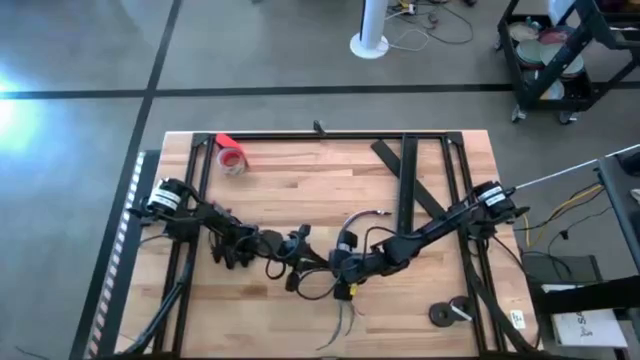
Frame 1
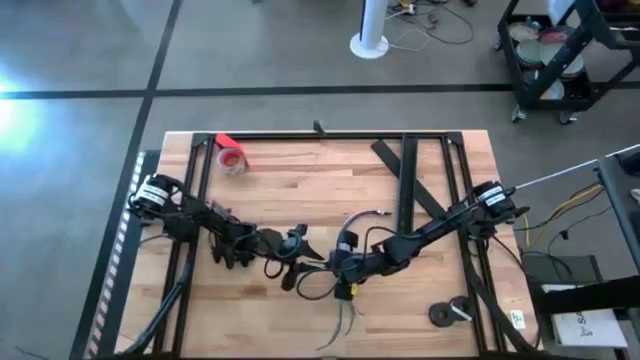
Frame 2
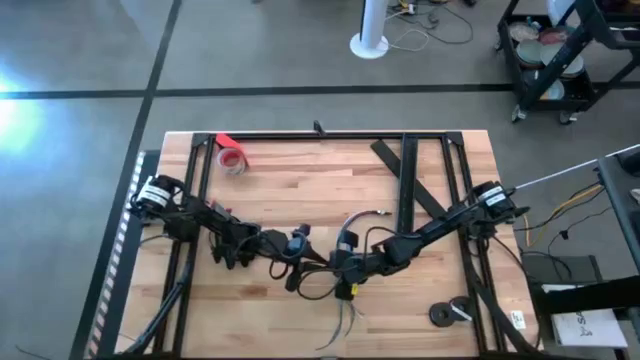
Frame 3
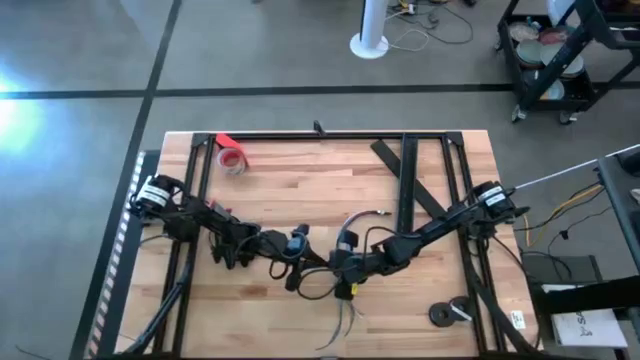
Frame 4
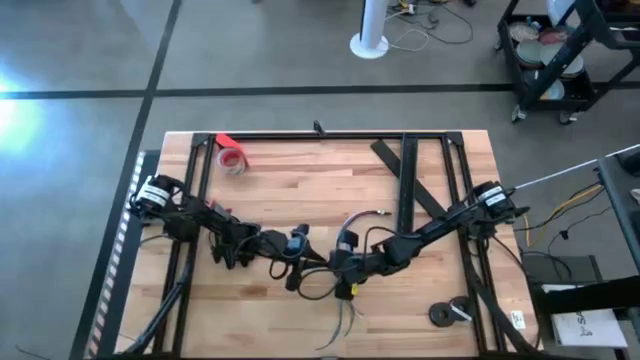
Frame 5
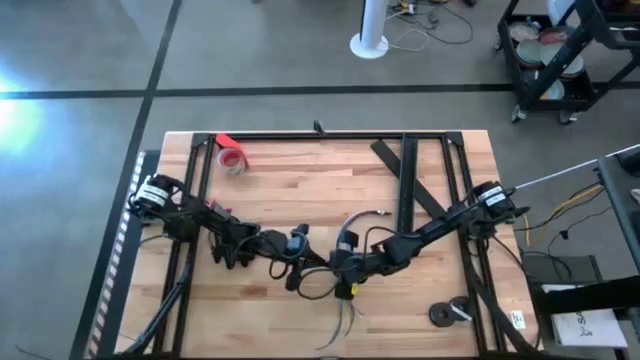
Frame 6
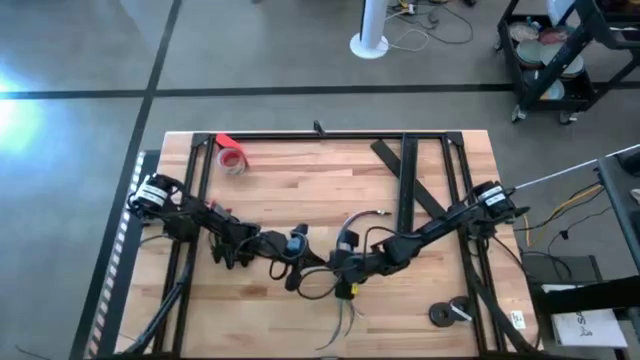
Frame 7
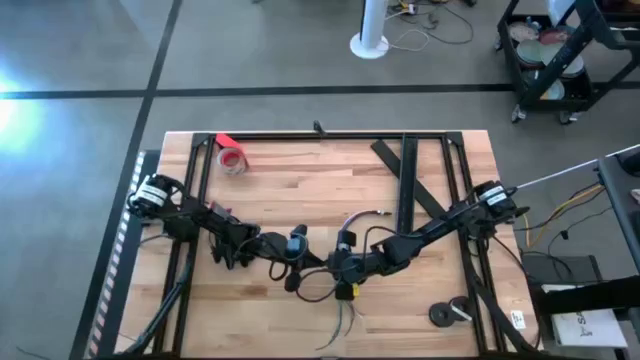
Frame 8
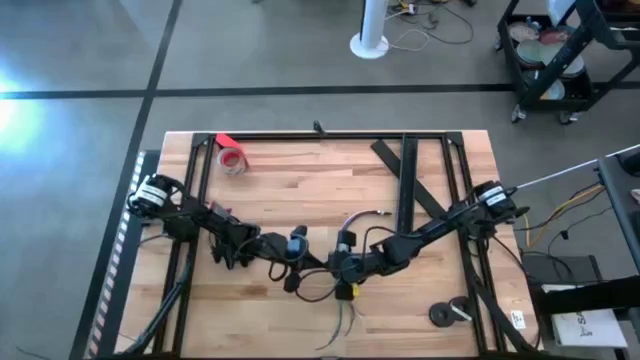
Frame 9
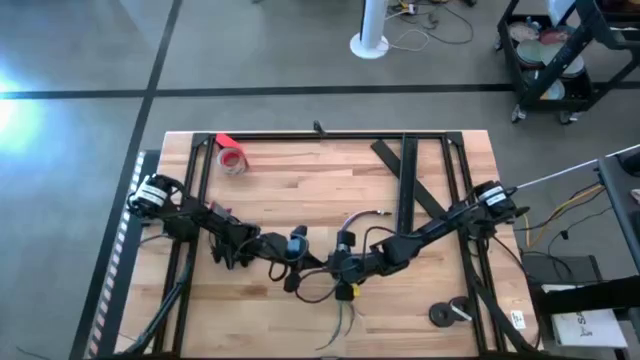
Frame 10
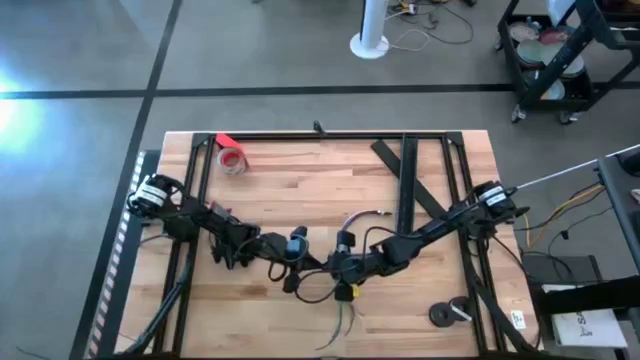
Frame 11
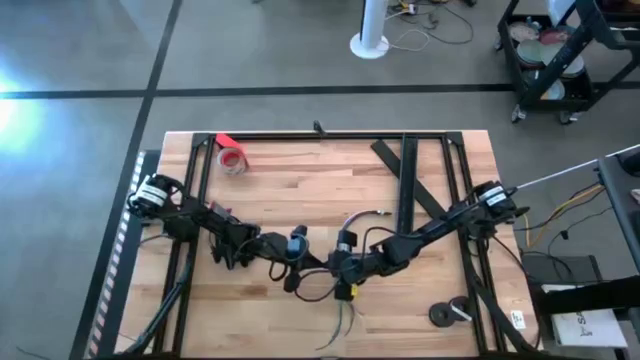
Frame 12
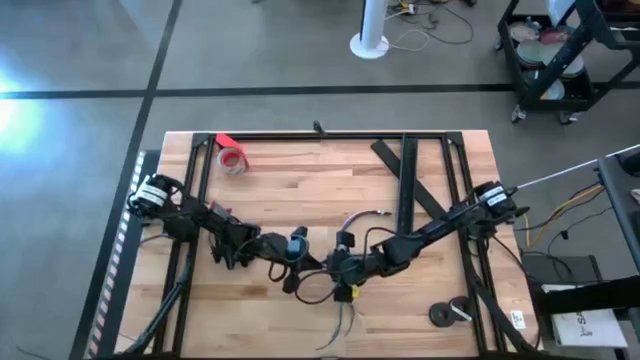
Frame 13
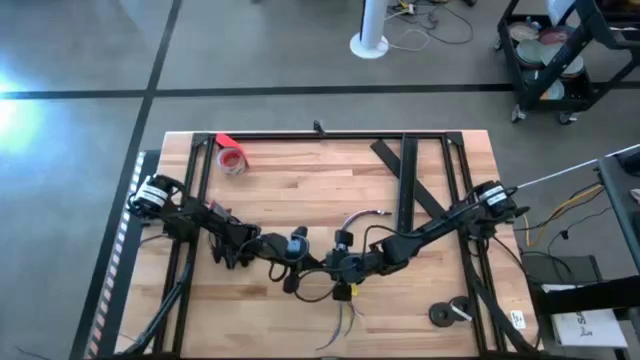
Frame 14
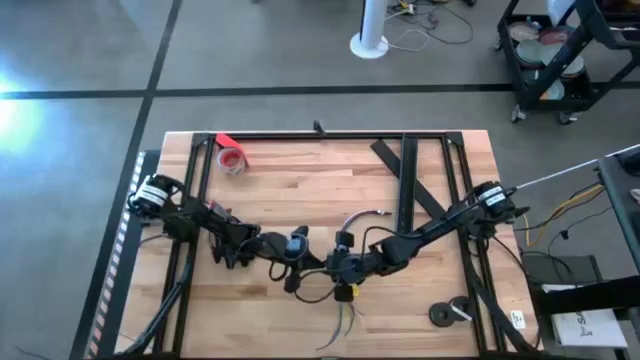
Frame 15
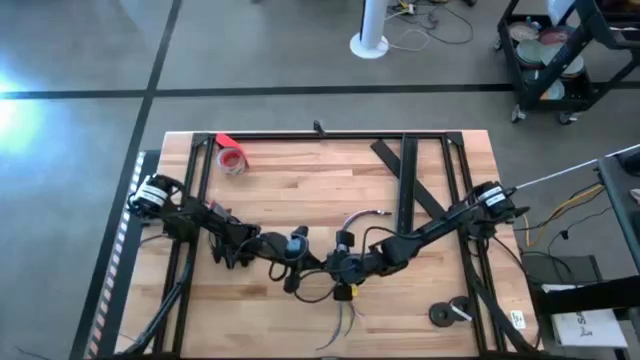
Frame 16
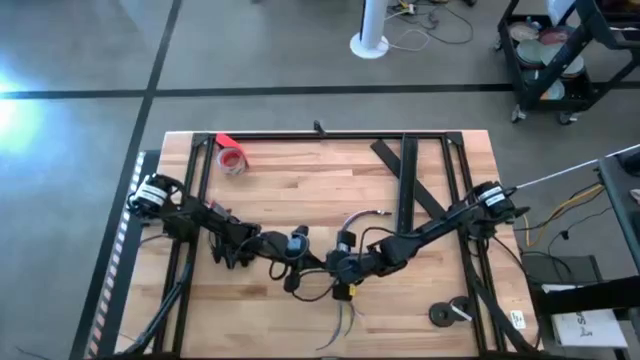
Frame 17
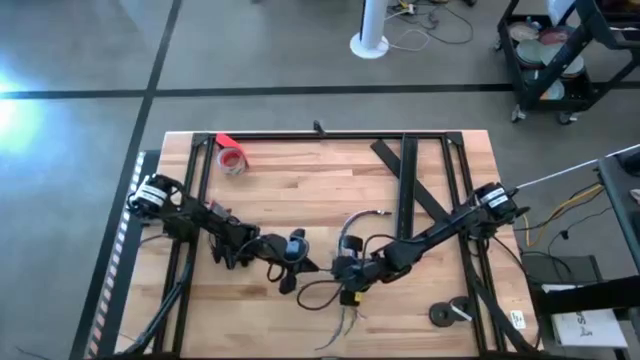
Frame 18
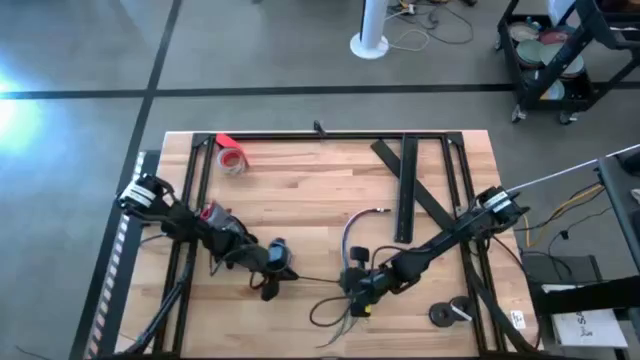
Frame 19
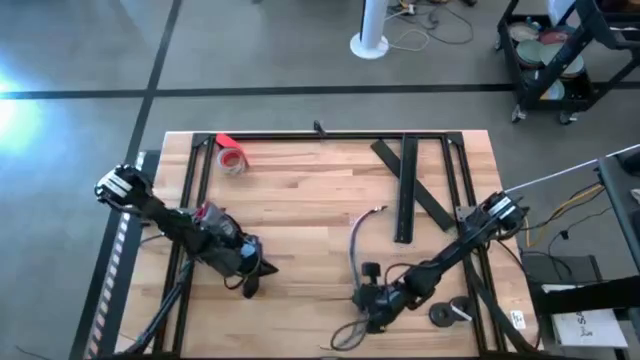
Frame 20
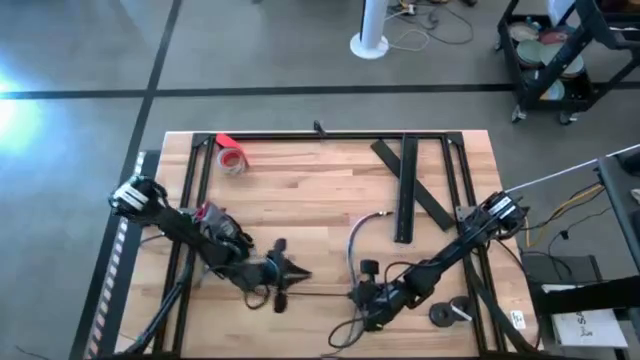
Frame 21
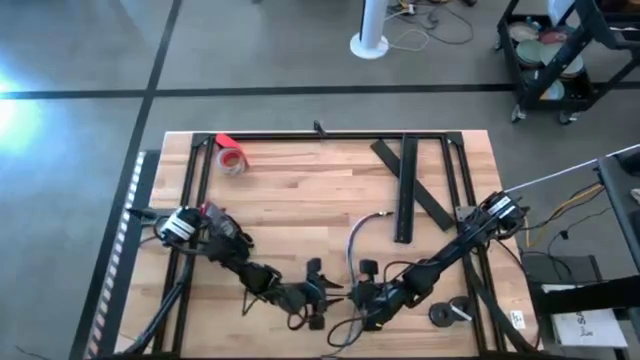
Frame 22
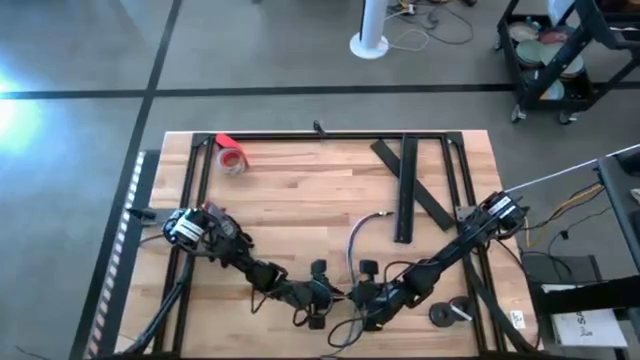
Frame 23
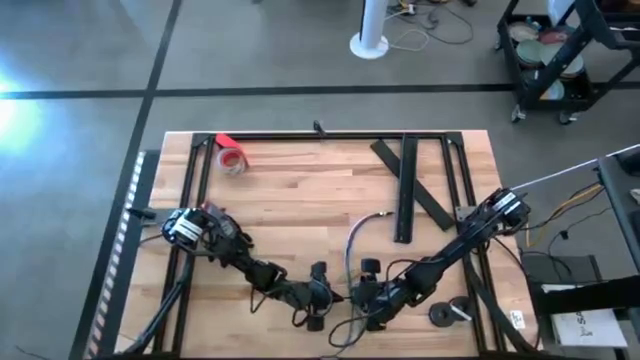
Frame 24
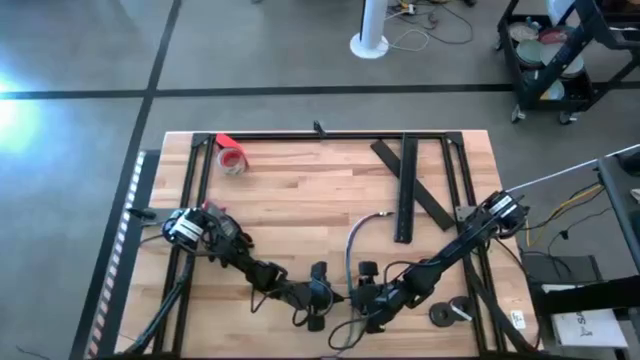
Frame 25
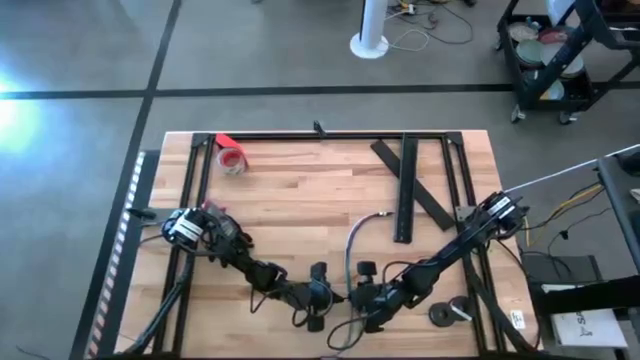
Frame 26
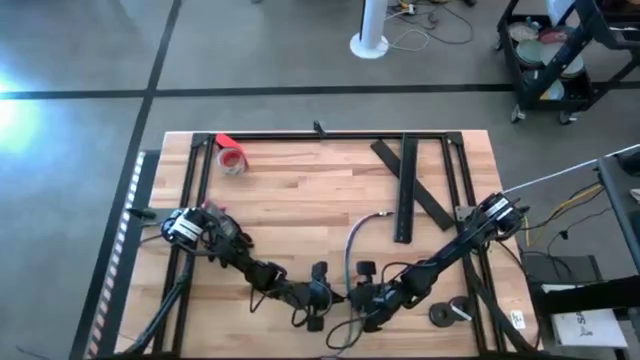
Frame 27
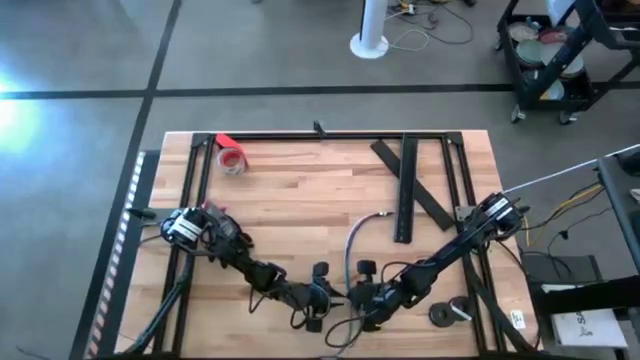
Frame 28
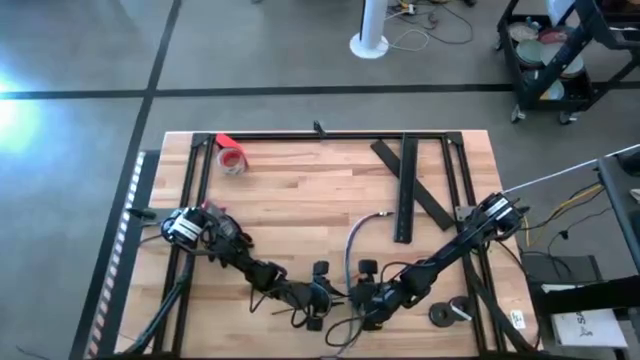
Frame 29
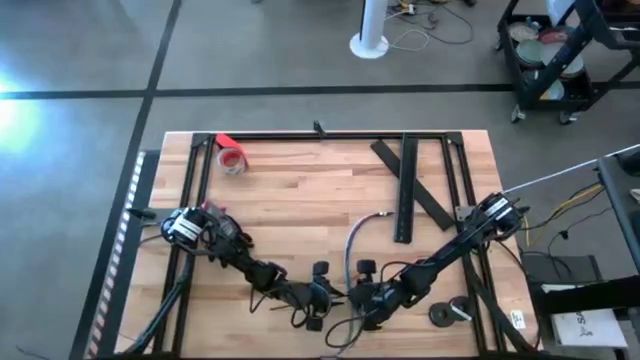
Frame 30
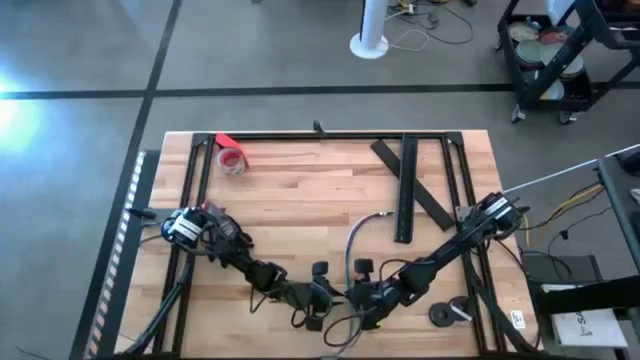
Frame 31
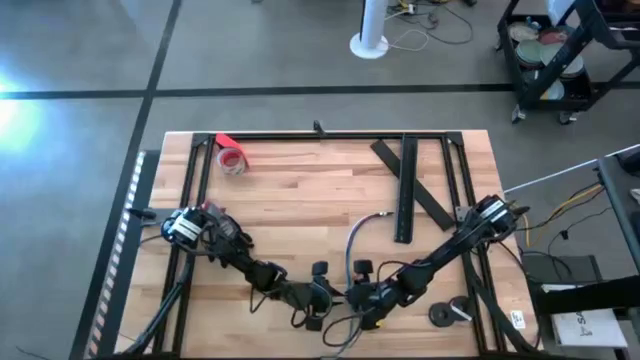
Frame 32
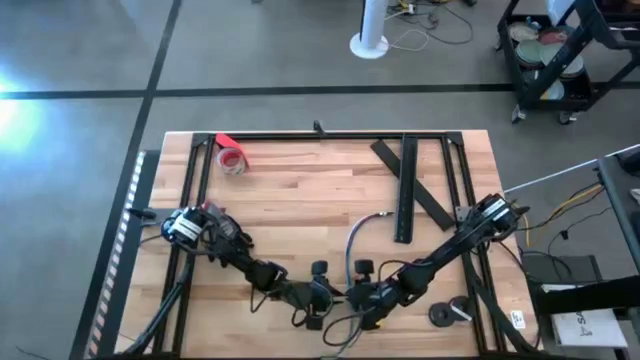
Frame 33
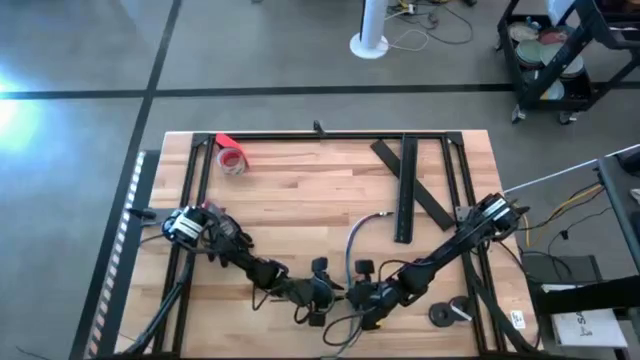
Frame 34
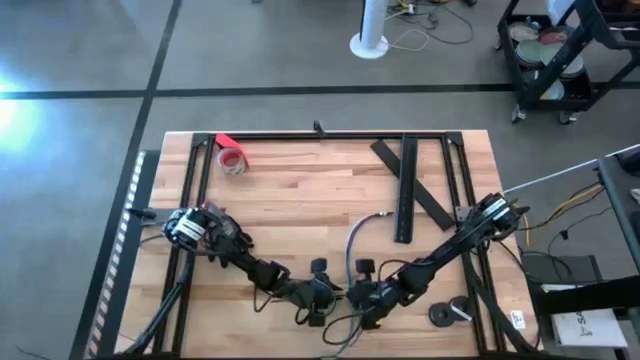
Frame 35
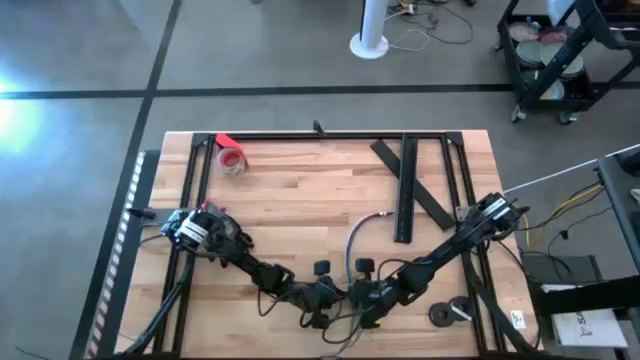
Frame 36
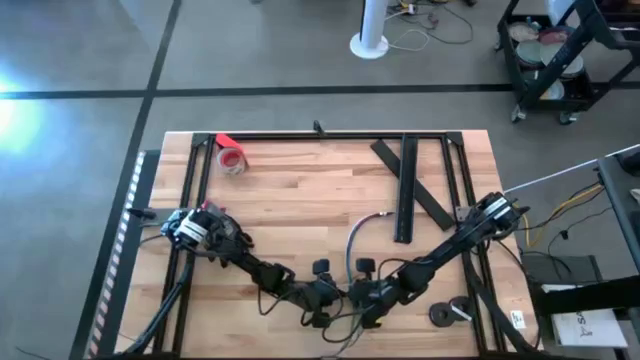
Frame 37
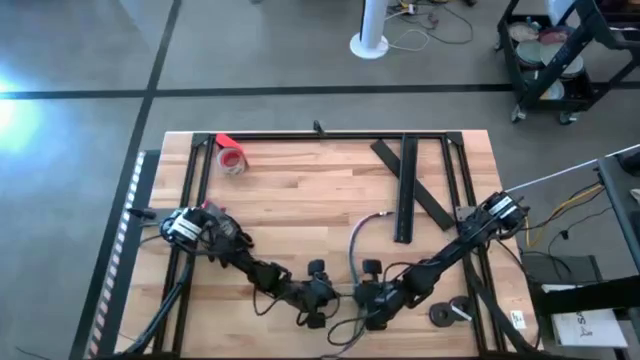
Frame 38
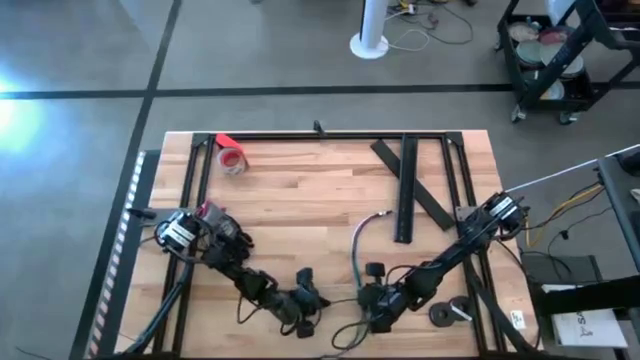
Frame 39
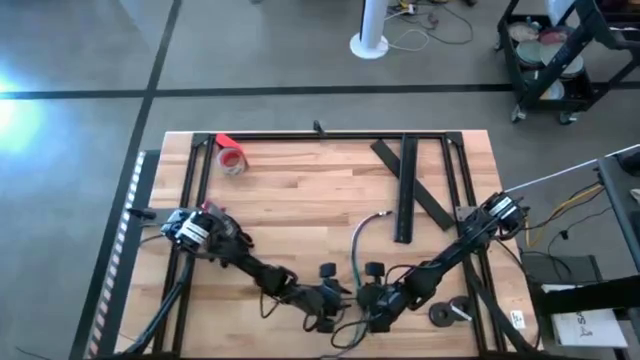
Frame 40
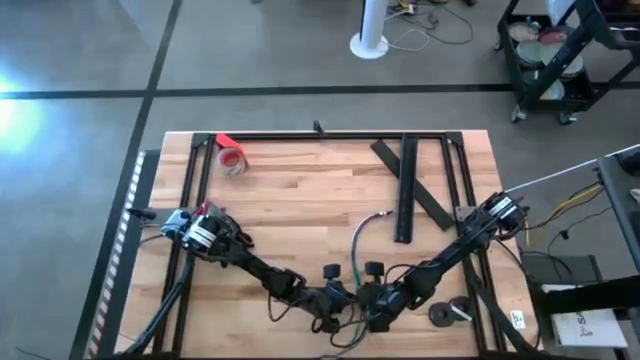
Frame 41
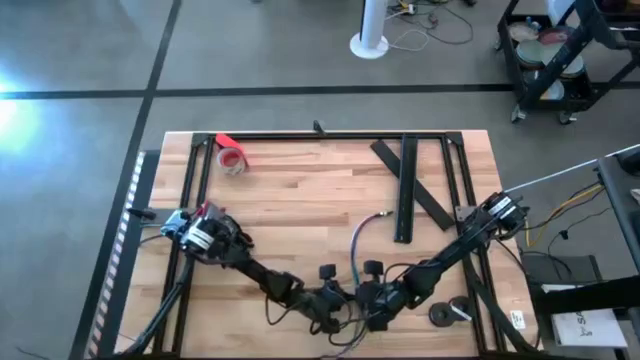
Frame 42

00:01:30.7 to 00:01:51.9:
Task: Ziptie cables
Wrap the zip tie around the cable bundle
